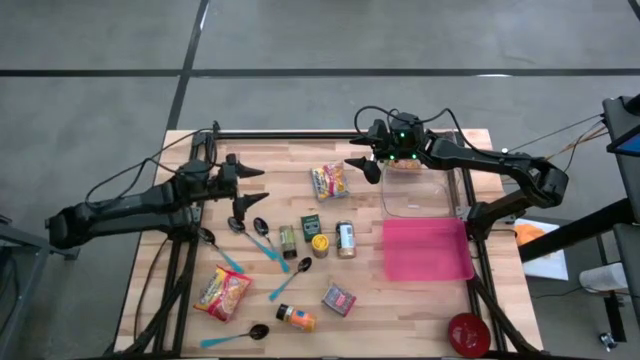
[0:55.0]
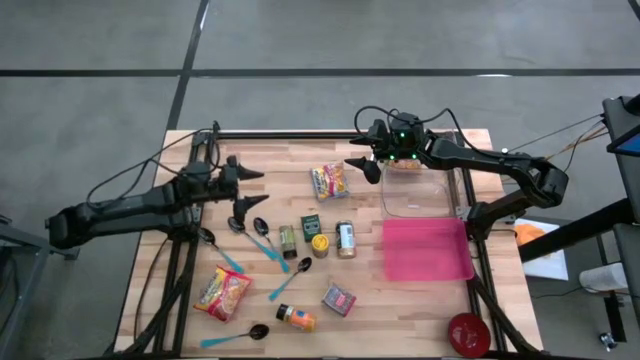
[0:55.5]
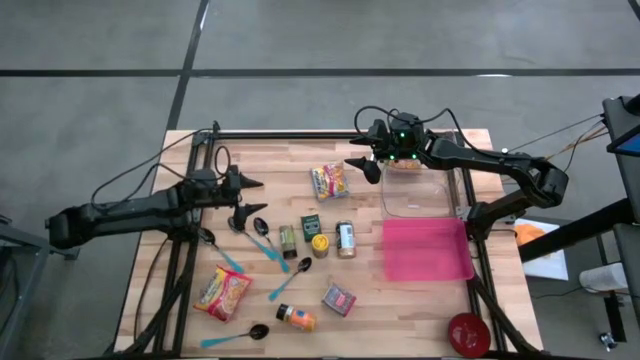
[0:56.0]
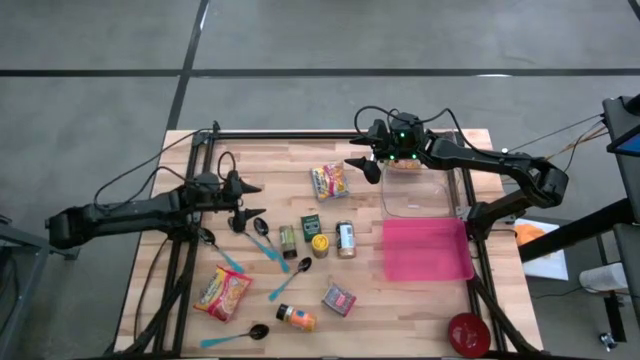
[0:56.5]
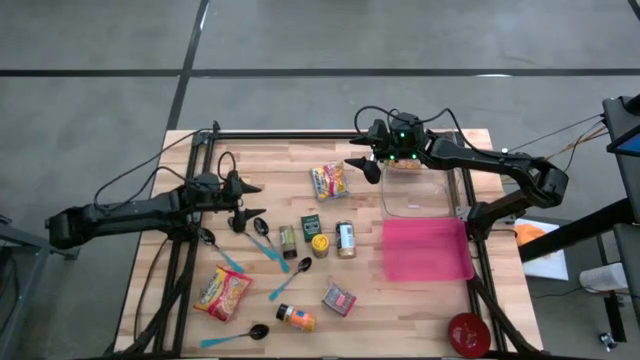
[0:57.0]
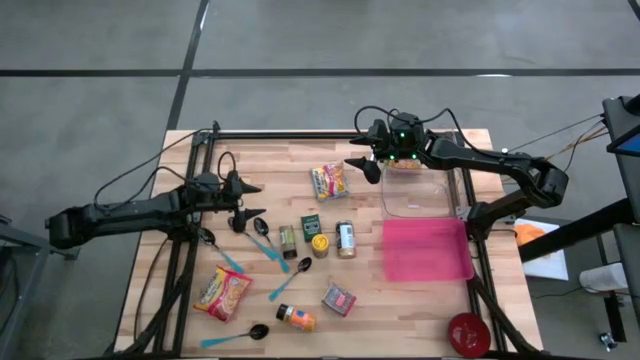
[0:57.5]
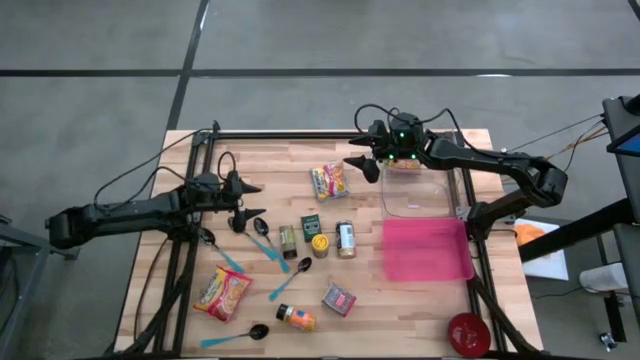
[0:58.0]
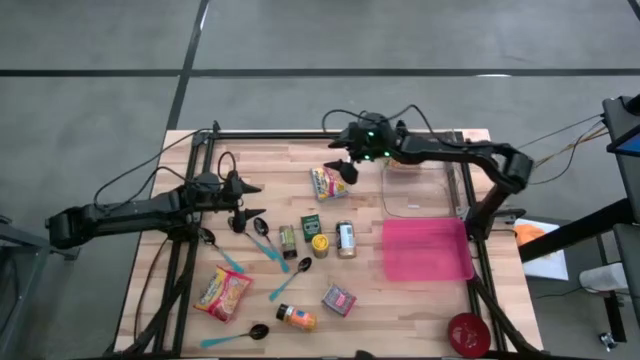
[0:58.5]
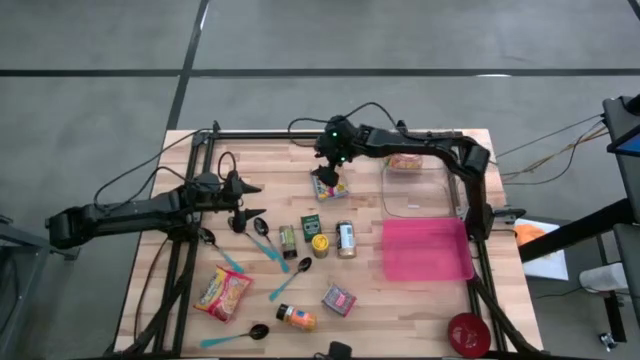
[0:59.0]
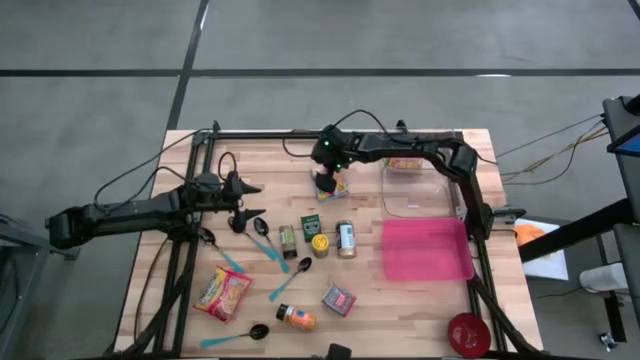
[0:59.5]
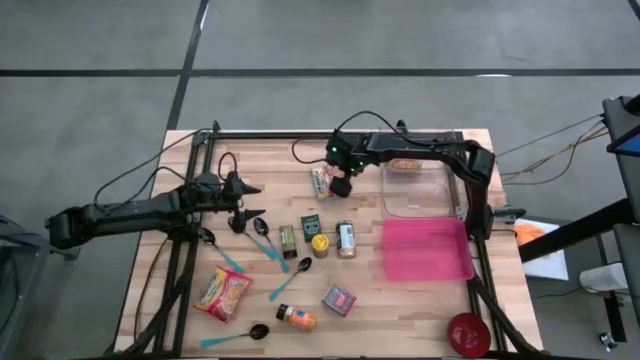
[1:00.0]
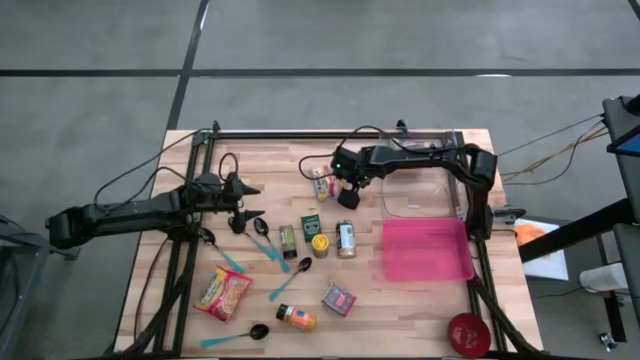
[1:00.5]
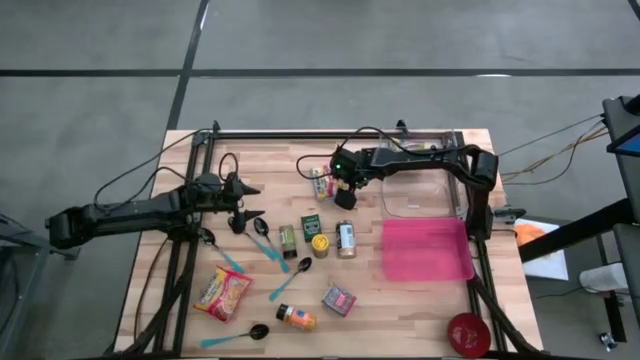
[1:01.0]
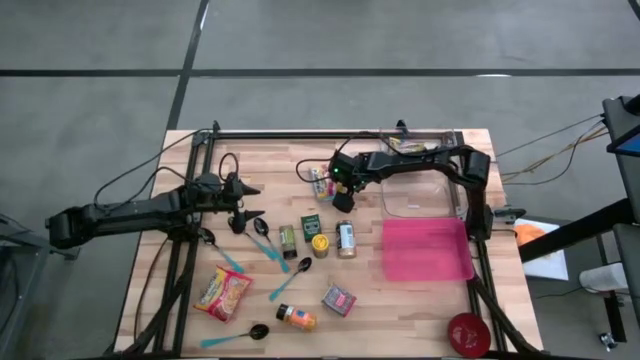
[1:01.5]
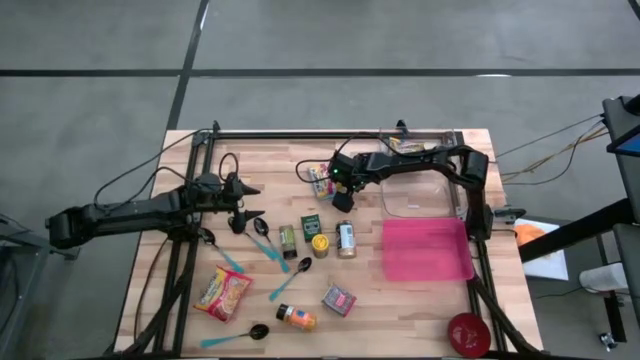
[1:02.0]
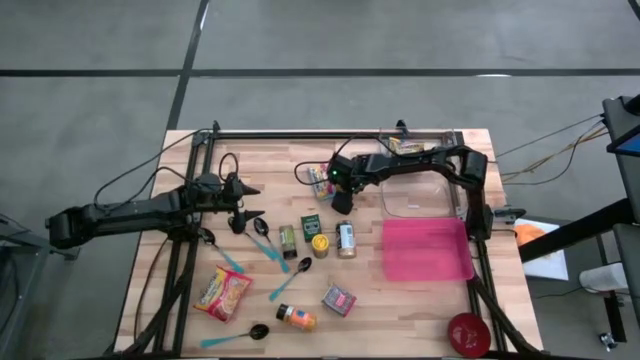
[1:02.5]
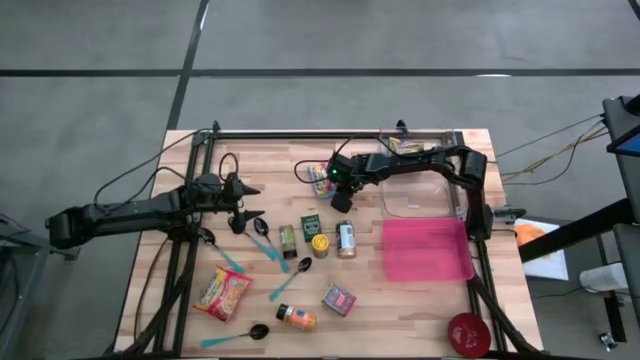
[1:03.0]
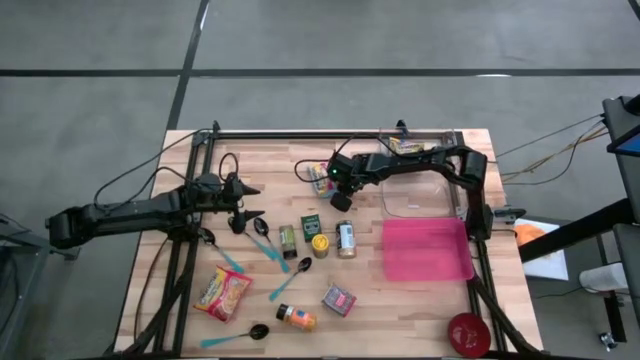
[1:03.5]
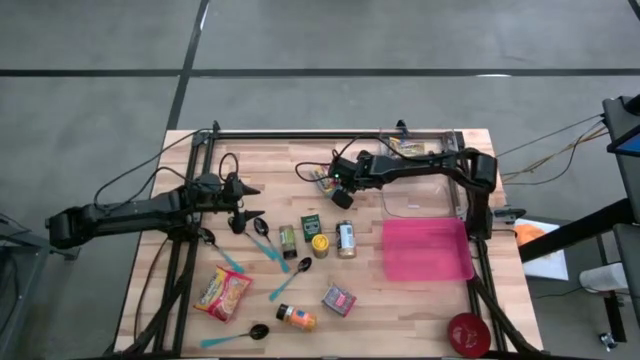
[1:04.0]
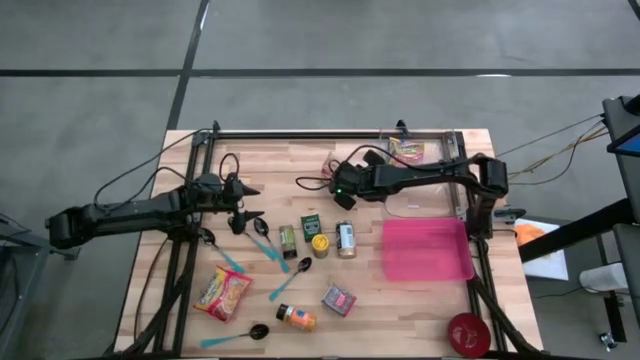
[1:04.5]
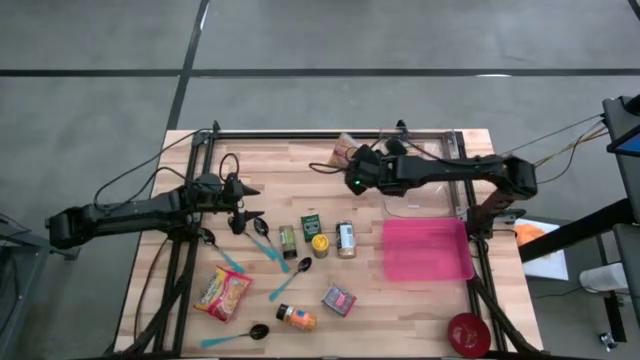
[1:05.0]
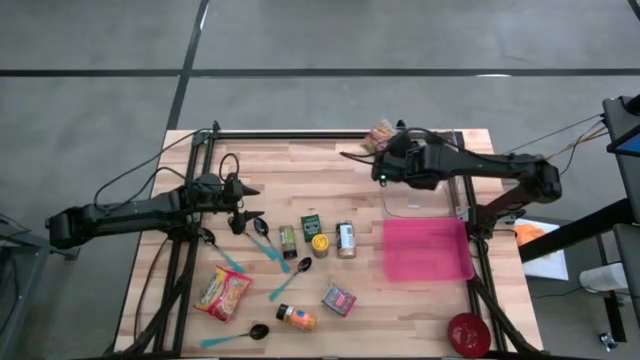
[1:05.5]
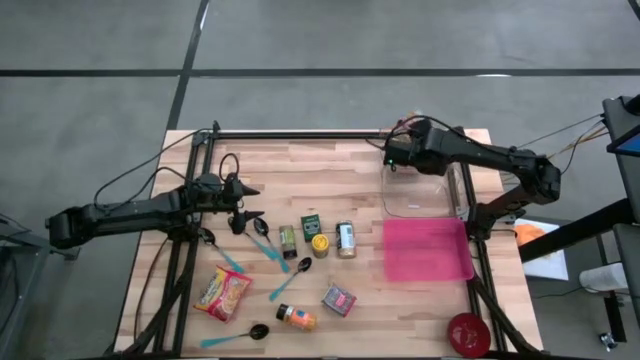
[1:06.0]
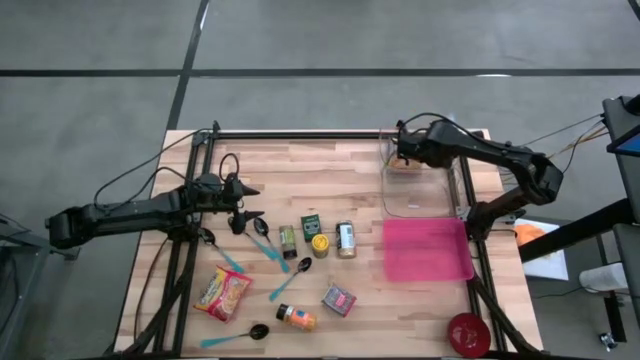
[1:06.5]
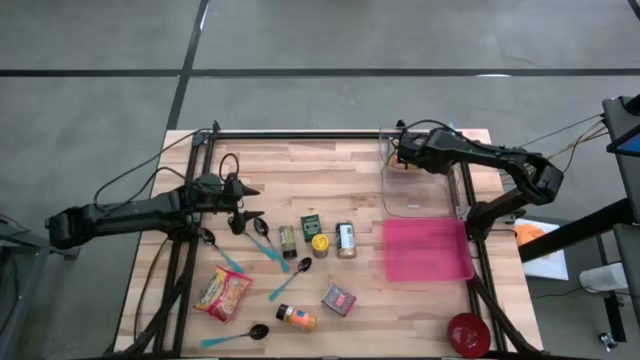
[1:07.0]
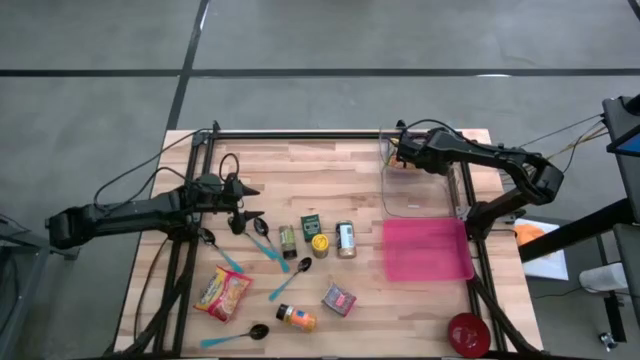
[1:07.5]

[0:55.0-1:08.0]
Put the light blue noodle pack into the top transparent bin
